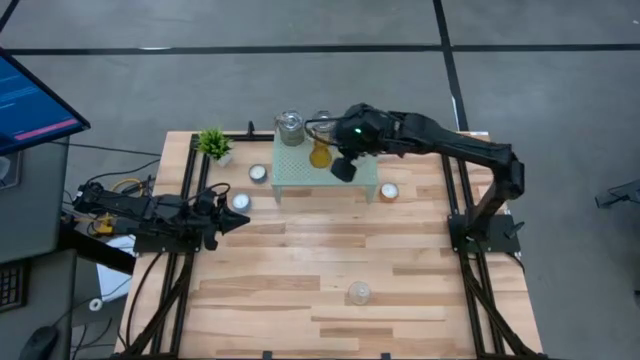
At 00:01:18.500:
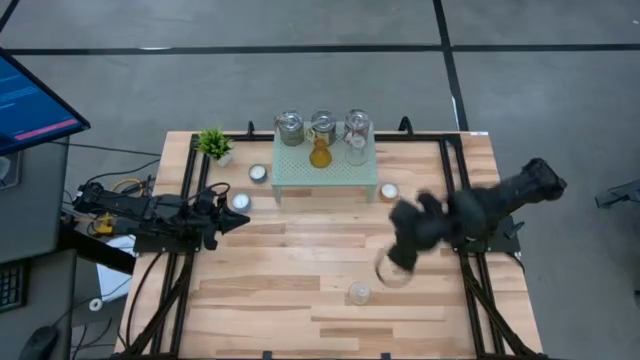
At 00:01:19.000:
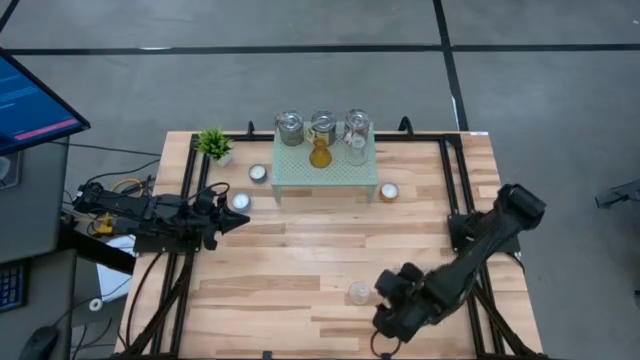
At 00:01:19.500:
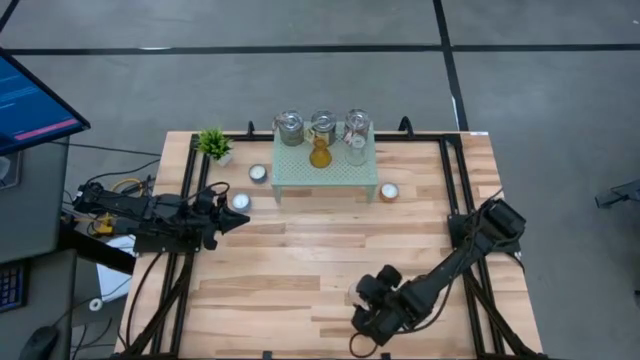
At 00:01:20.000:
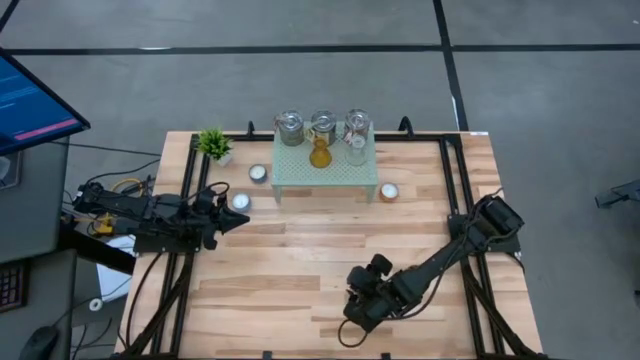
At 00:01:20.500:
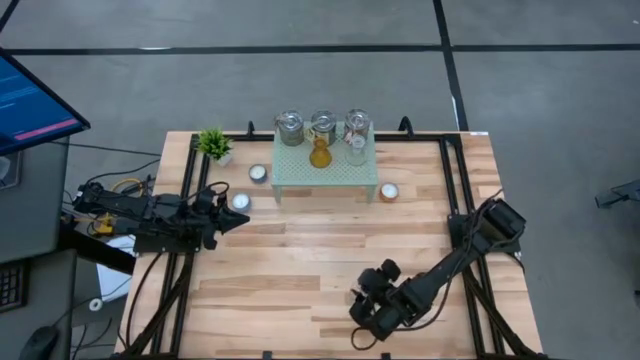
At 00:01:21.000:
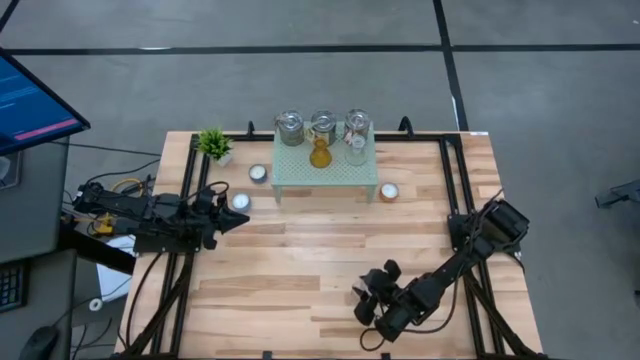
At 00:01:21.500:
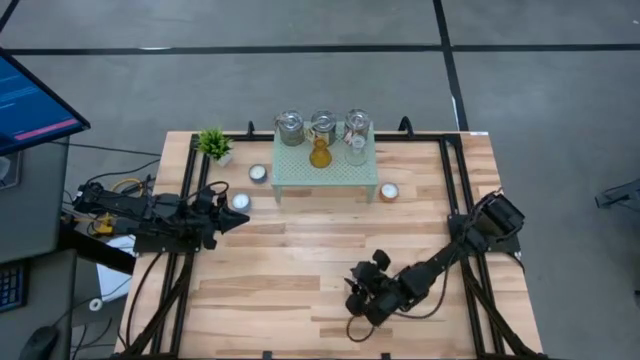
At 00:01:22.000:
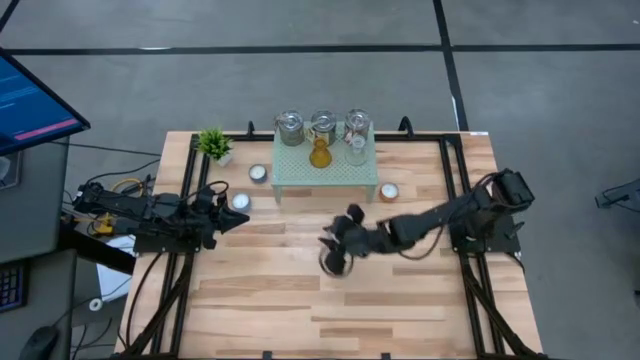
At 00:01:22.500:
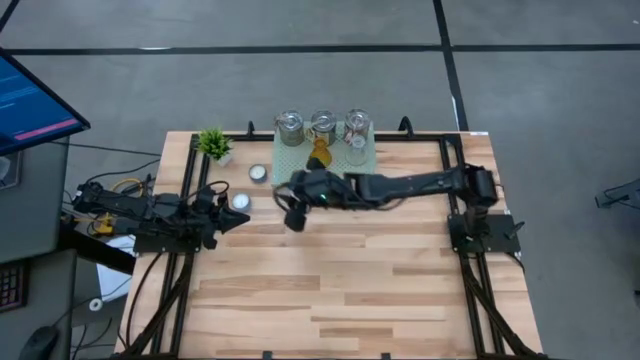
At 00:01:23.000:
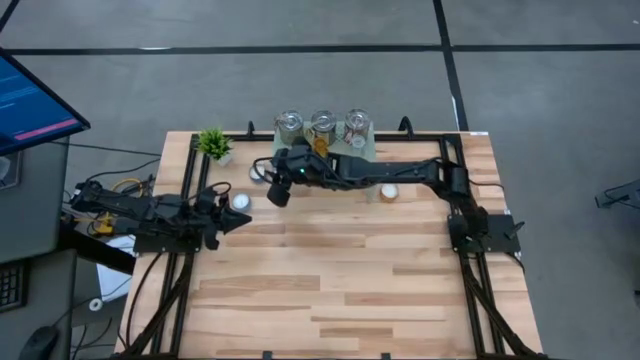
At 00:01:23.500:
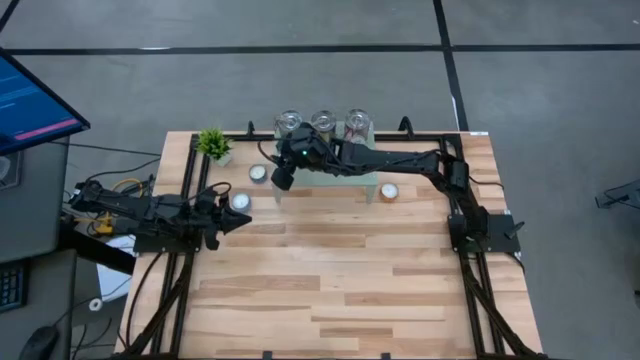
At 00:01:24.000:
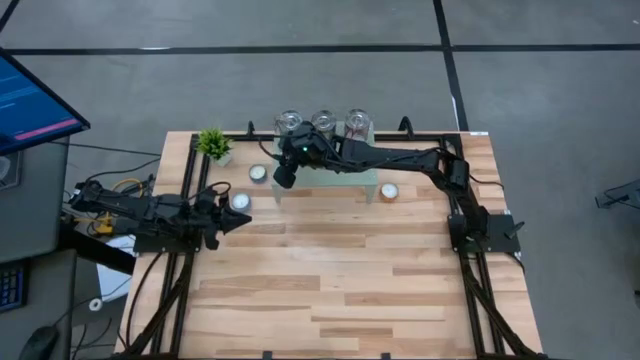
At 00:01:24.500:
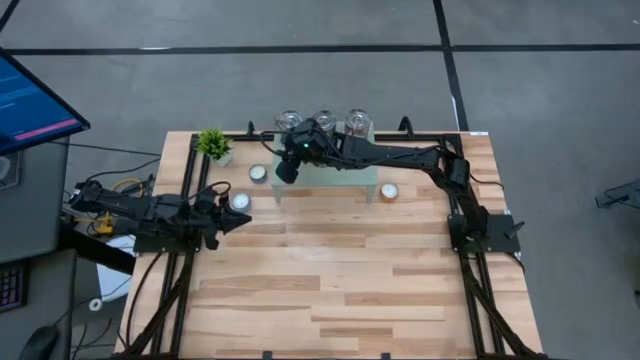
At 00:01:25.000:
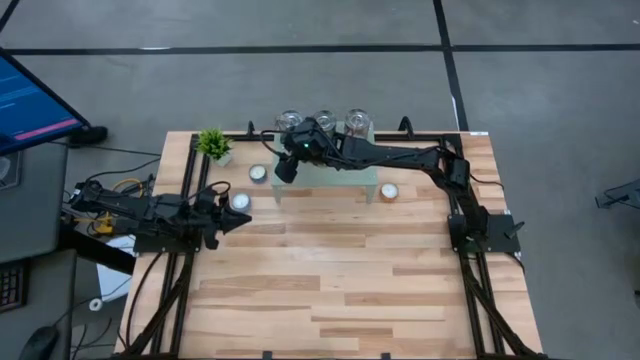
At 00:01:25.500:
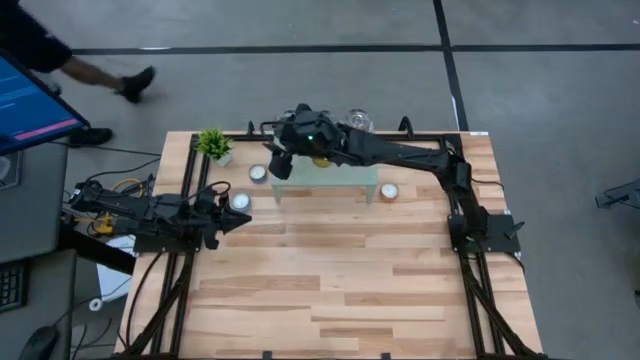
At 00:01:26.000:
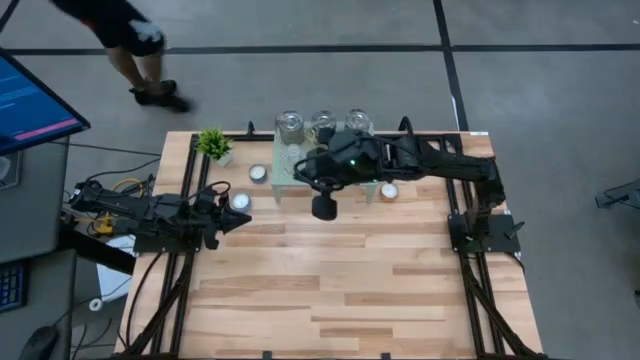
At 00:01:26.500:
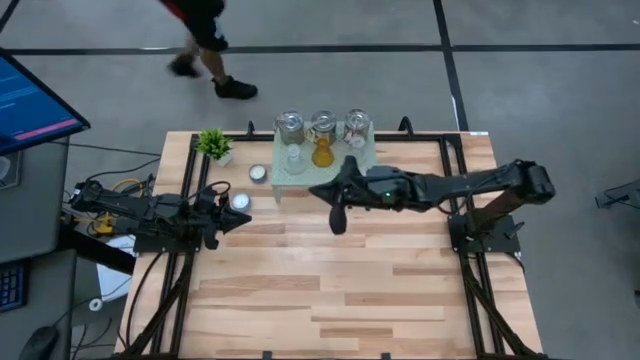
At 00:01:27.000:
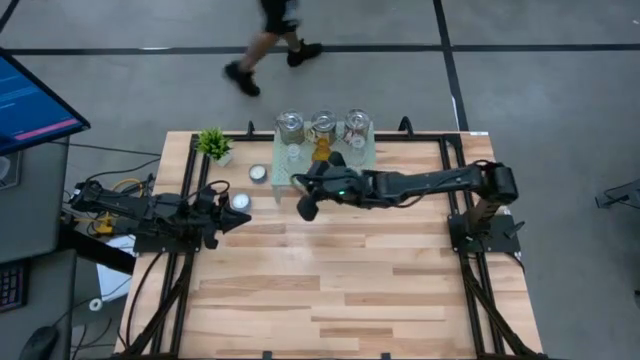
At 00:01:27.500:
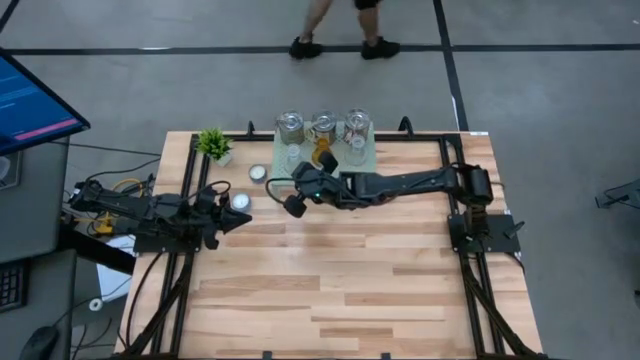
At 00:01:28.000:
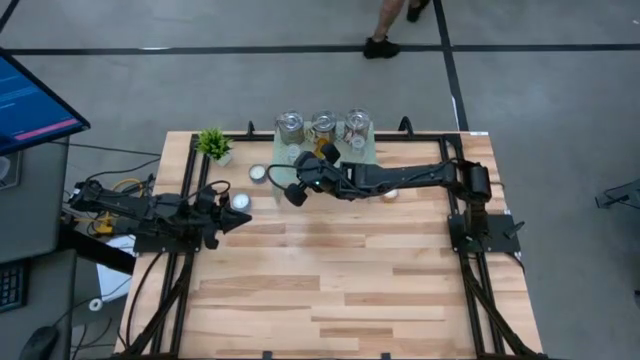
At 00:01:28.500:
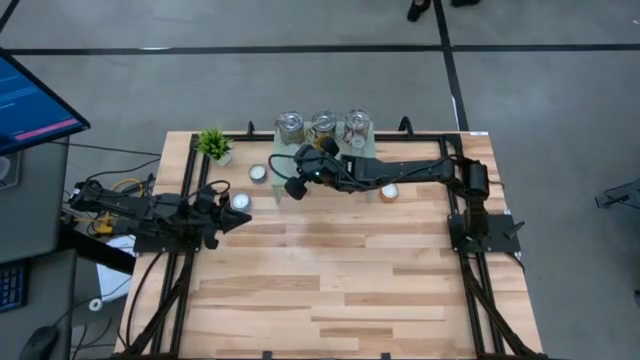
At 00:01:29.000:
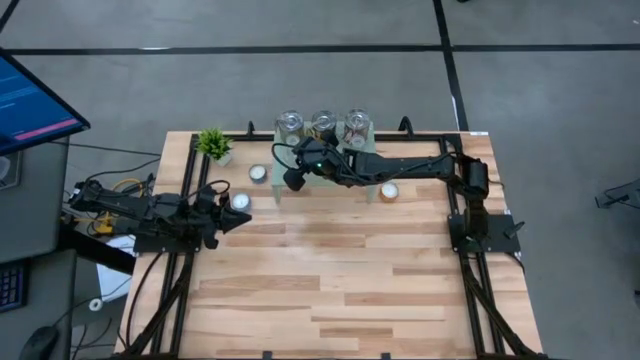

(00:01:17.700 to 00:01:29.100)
Task: Pick & Place candle stick holders
Put the transparent candle holder on the shelf
